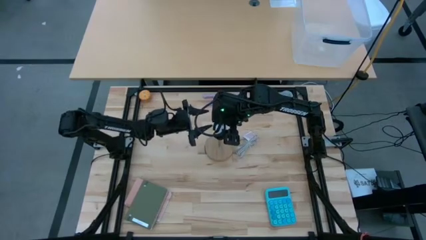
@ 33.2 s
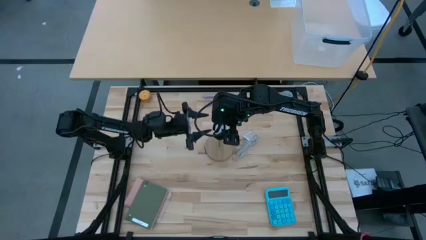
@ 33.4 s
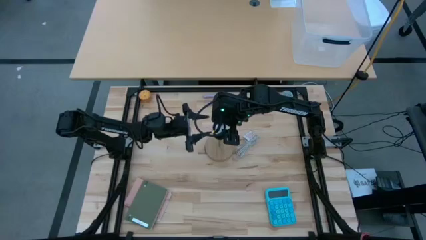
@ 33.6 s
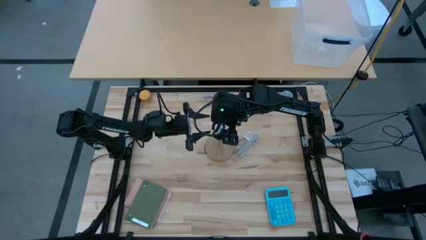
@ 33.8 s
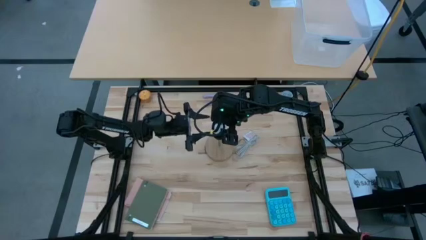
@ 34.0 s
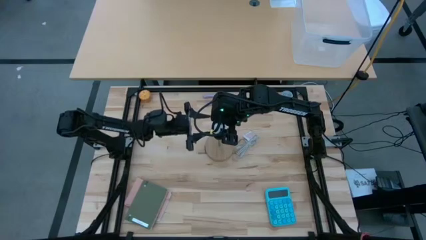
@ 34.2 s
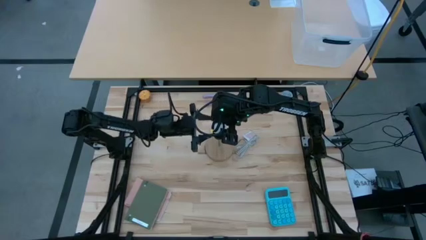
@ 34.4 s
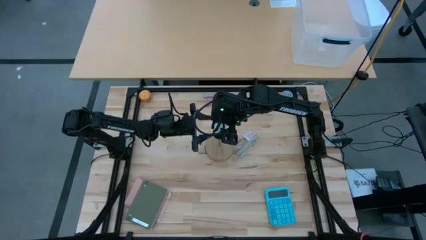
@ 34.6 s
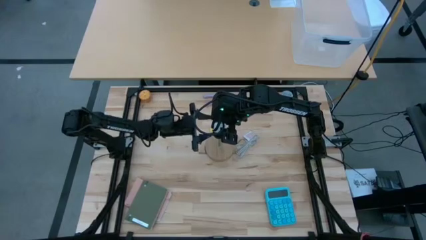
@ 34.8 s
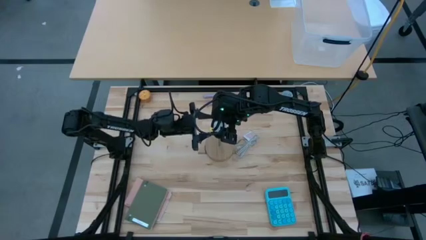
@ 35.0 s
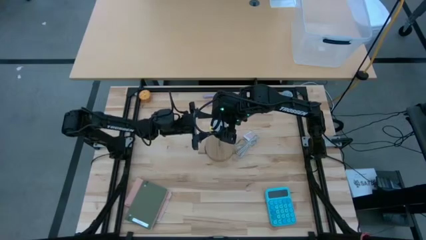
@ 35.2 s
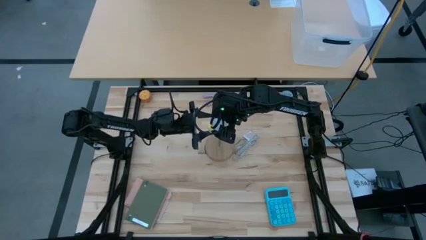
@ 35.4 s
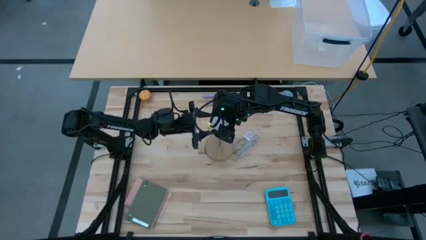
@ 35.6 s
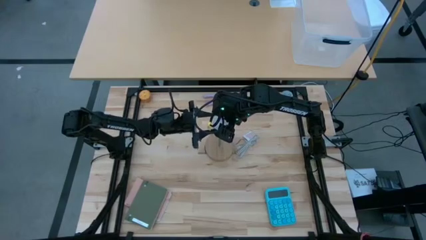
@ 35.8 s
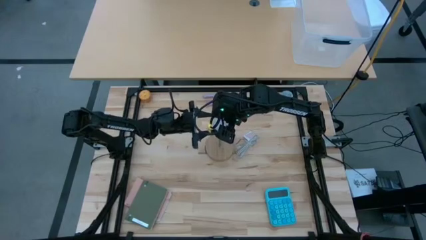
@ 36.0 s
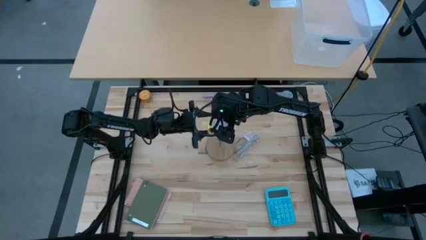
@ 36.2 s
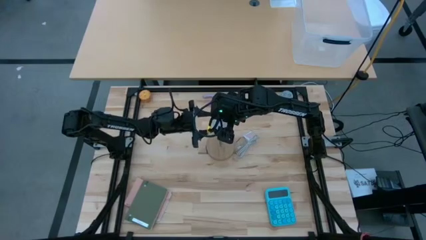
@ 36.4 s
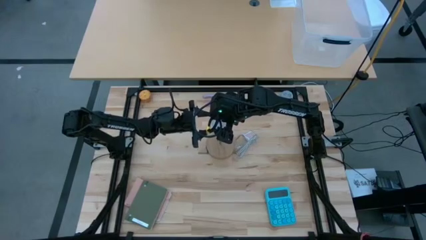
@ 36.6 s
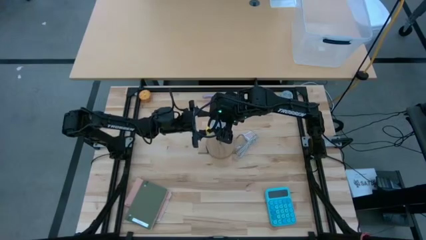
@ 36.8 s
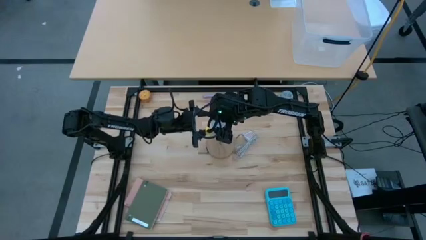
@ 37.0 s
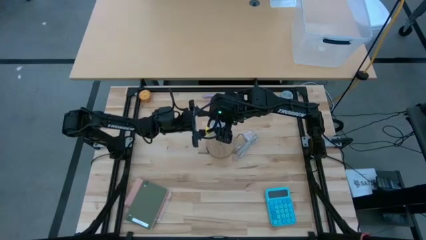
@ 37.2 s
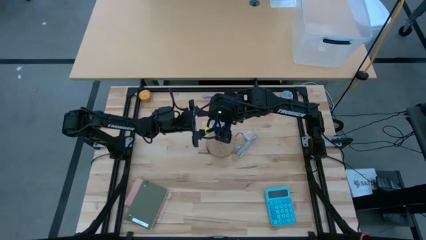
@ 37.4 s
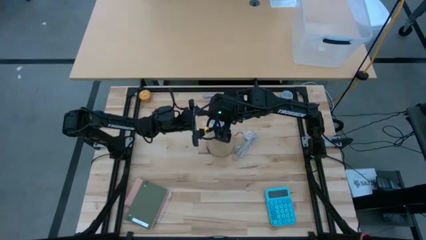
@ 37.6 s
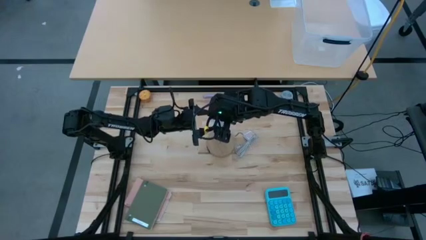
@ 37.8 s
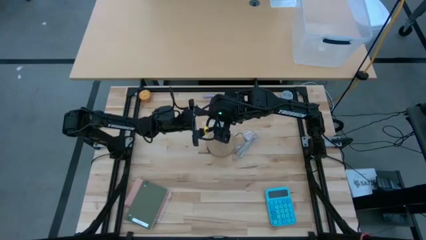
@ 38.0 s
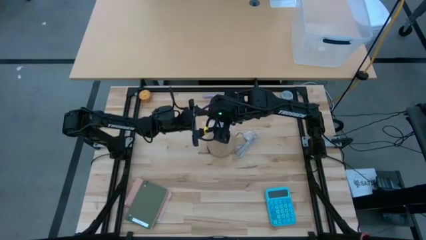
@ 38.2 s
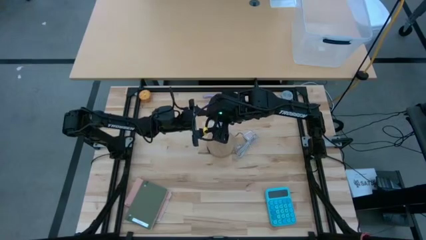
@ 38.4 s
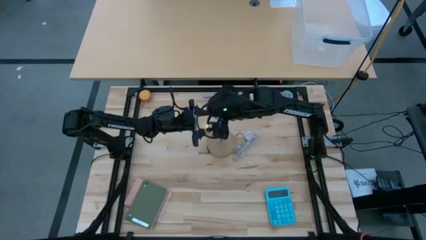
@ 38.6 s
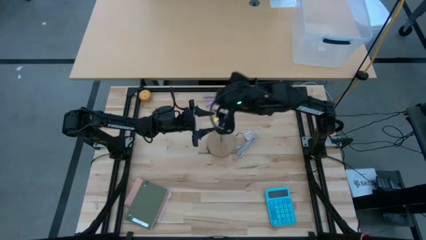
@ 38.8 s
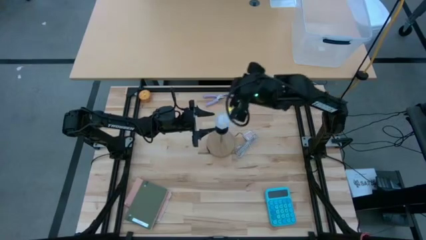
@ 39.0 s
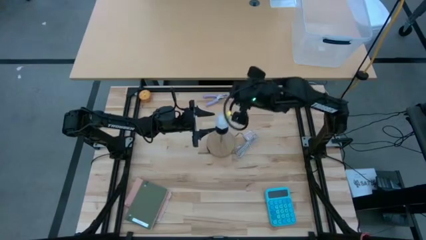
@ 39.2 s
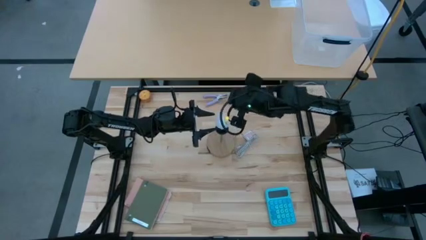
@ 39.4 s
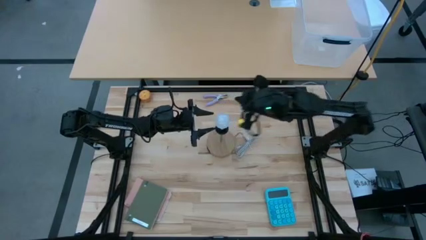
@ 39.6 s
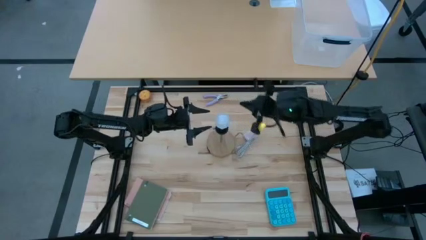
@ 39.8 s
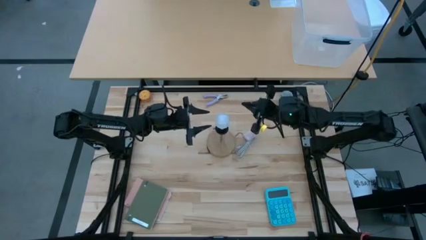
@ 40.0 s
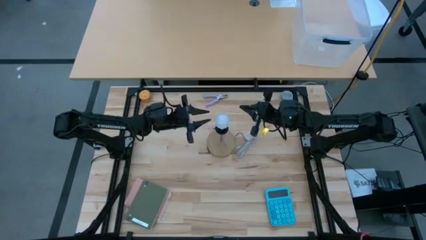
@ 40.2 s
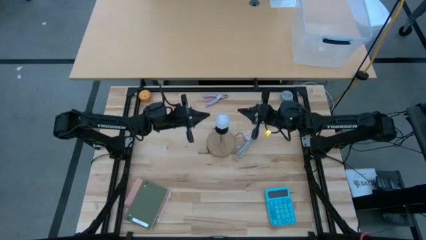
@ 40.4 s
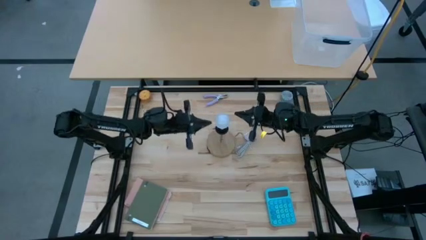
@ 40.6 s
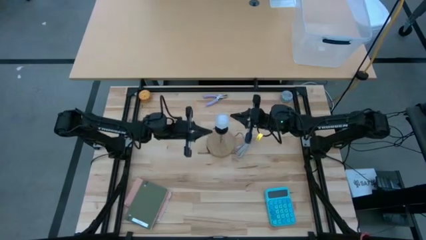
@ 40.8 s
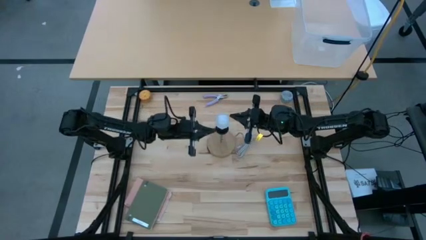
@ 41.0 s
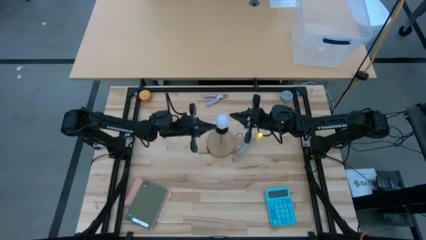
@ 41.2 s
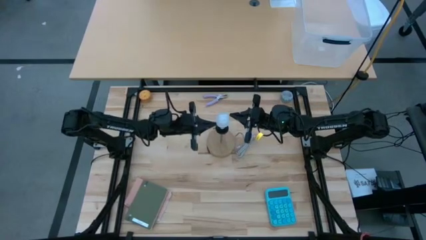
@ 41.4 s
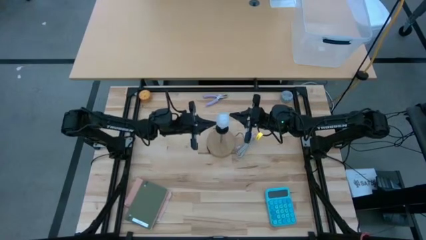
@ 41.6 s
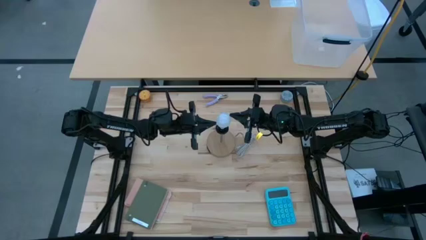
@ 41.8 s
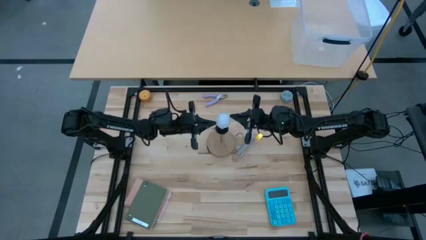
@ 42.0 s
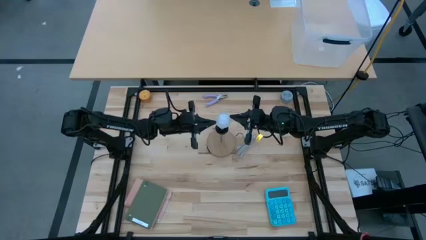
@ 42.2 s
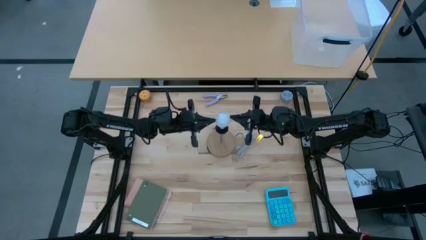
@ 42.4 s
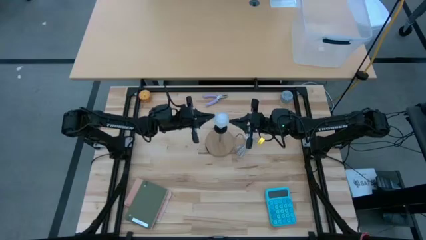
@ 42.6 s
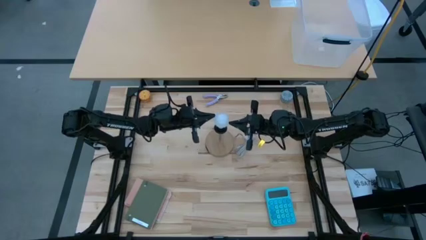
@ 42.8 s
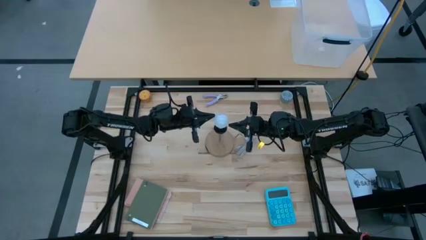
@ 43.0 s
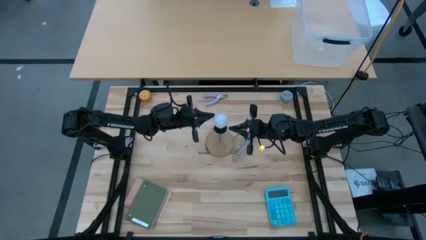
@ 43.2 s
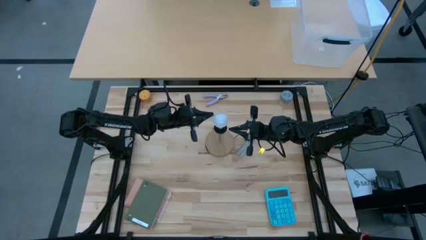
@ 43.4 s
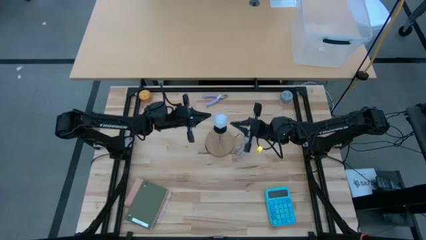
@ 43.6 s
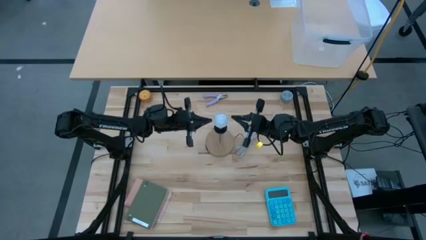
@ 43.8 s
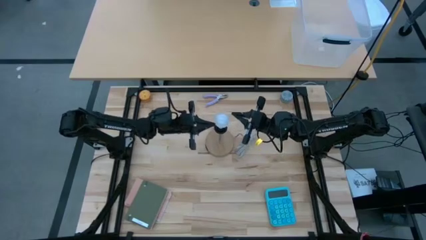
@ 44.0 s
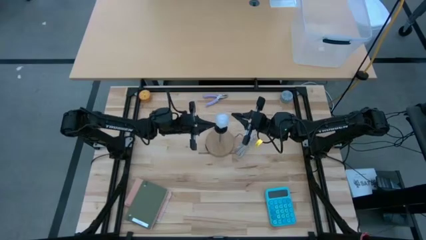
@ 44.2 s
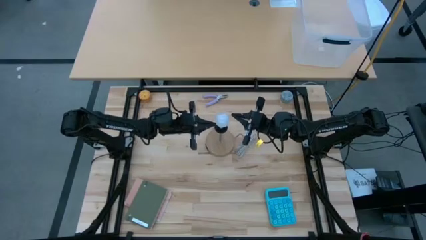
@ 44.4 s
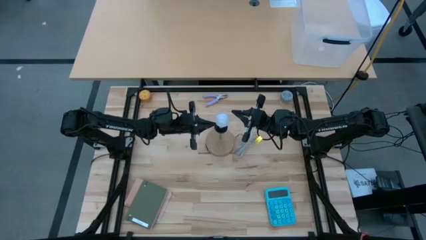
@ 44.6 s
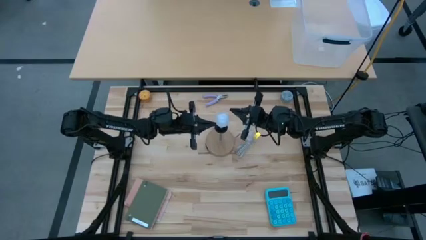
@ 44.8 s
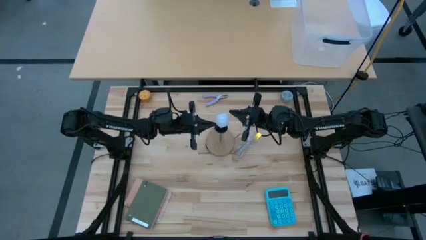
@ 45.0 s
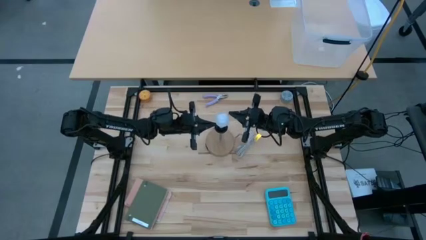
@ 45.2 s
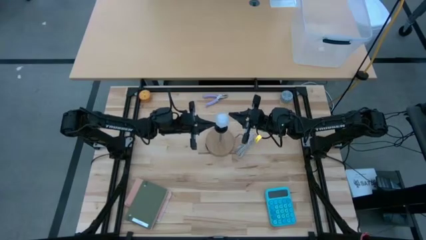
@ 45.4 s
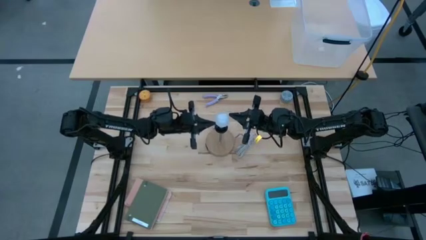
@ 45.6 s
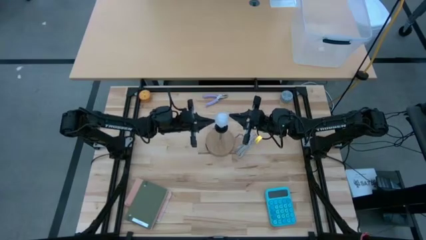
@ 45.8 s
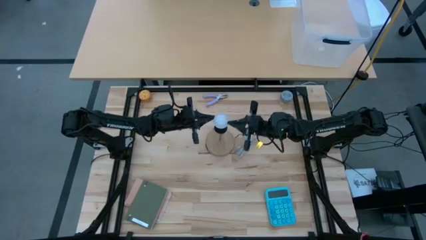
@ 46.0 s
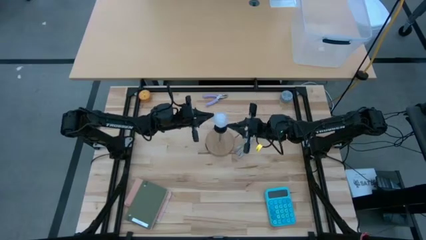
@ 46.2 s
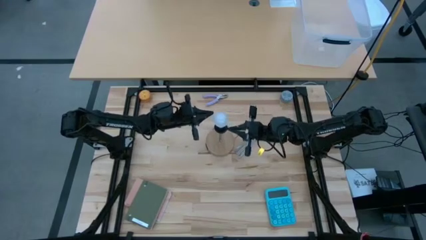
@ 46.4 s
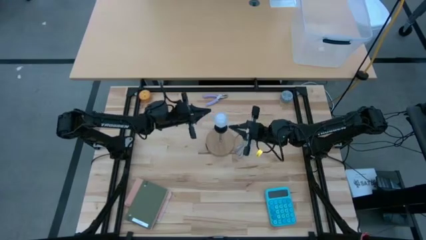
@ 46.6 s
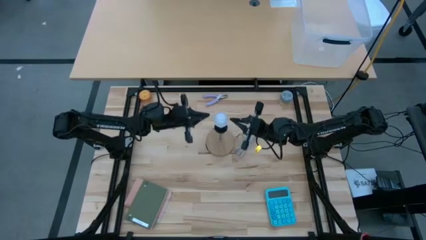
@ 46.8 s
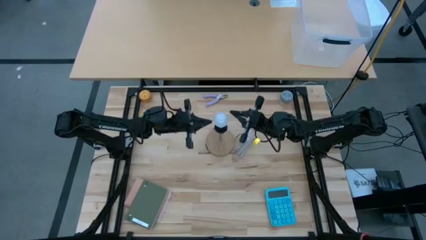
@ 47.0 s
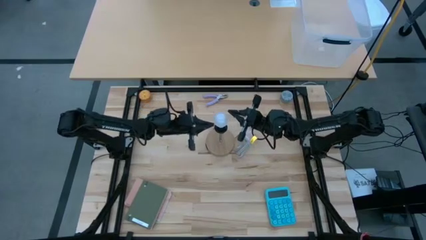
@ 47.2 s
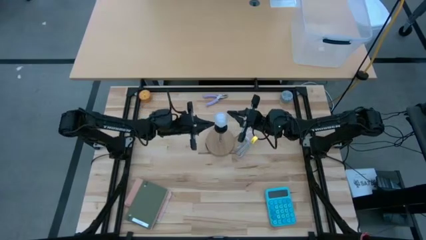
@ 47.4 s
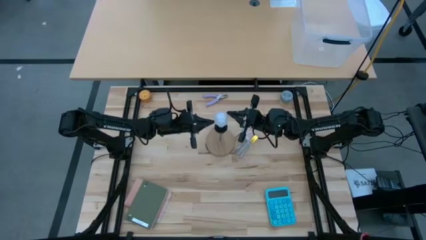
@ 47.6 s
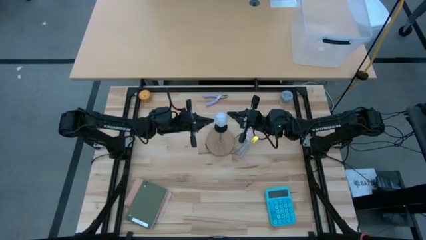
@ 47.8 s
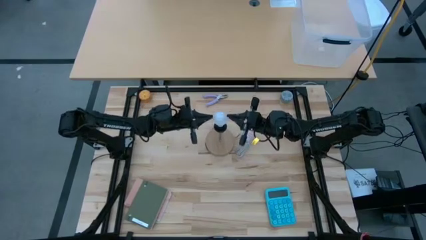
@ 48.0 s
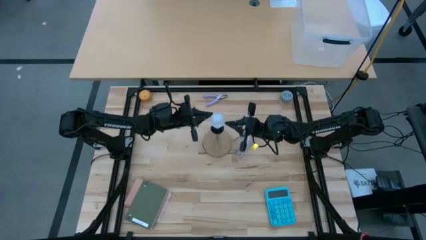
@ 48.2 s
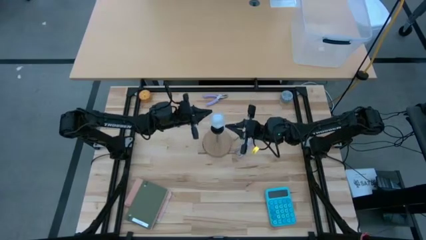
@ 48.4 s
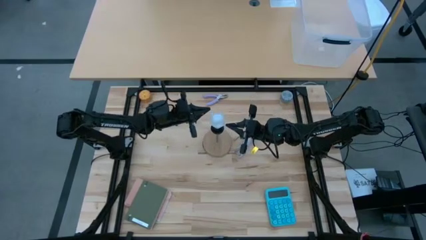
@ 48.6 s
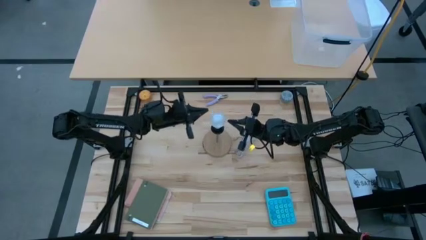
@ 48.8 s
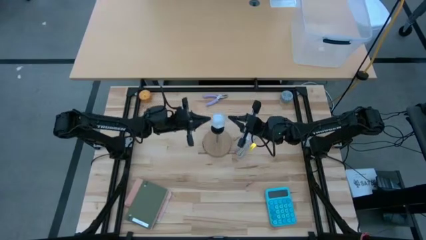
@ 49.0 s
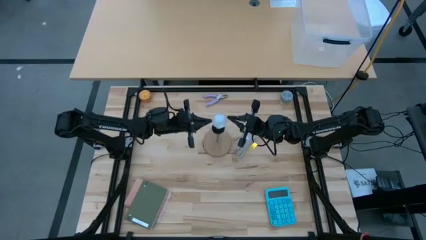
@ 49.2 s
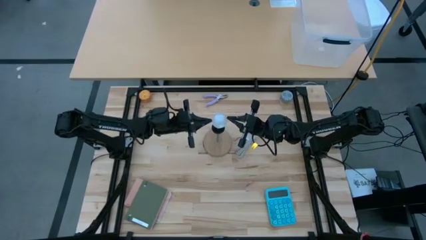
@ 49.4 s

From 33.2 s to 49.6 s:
Task: Screw lightbulb
Insert the light bulb on the brown lamp
